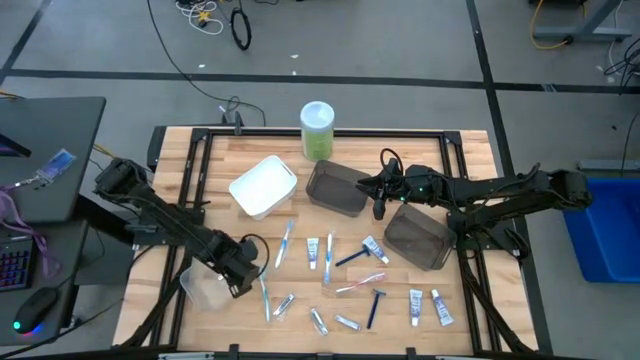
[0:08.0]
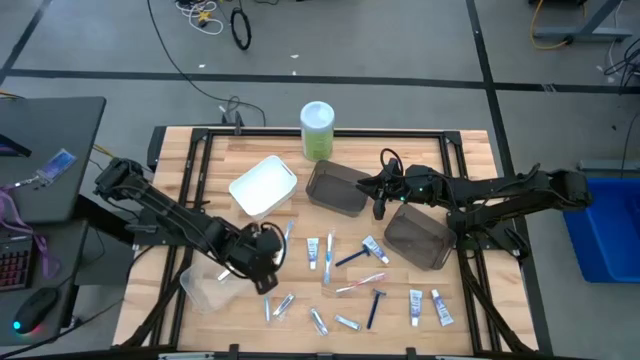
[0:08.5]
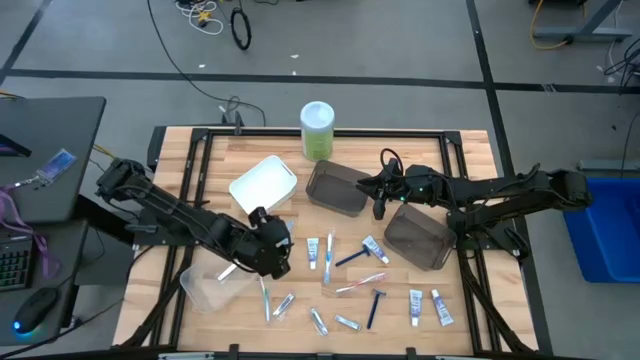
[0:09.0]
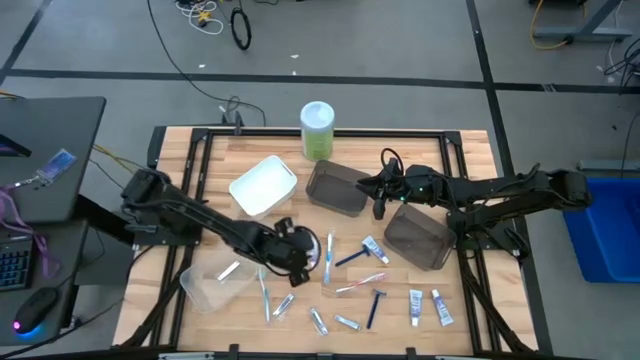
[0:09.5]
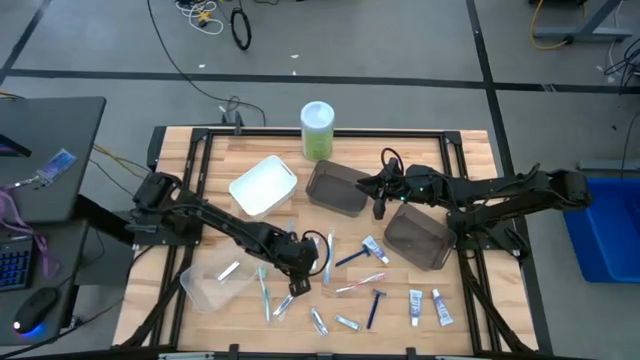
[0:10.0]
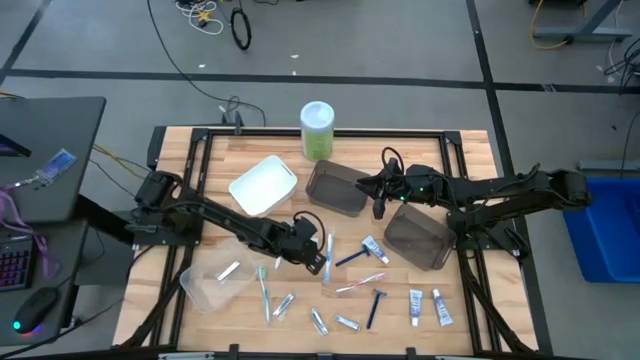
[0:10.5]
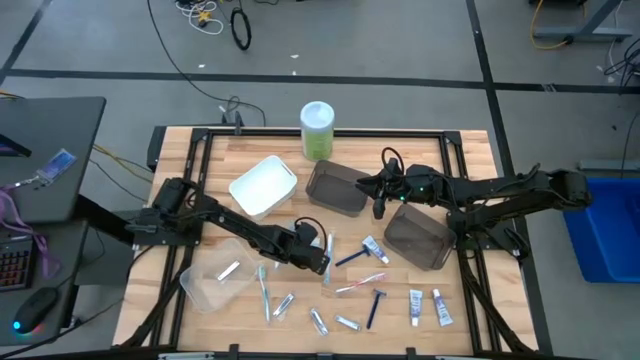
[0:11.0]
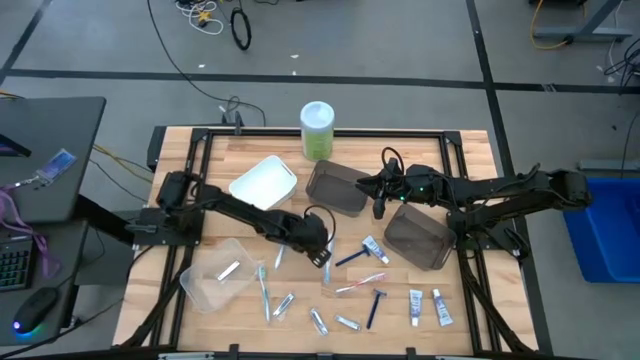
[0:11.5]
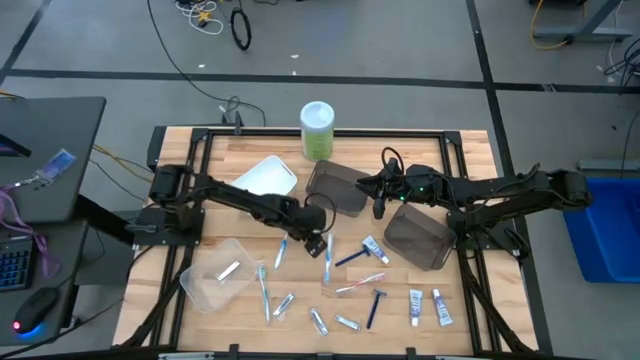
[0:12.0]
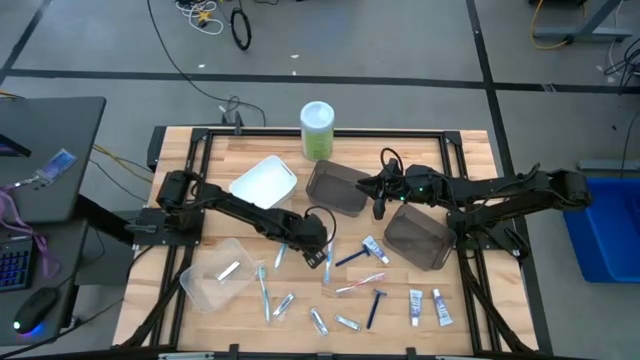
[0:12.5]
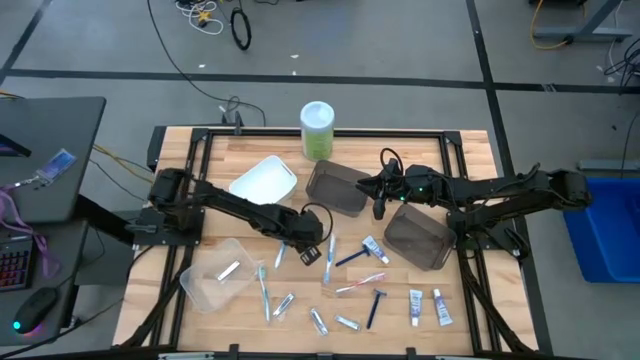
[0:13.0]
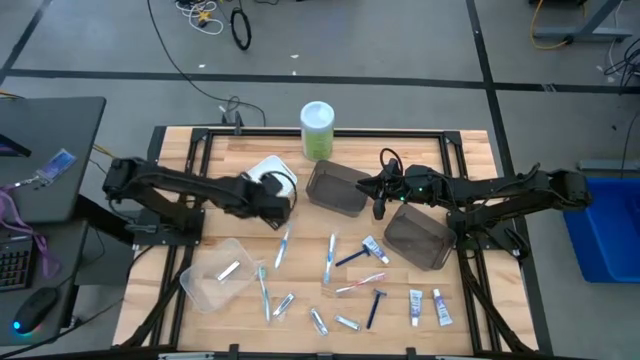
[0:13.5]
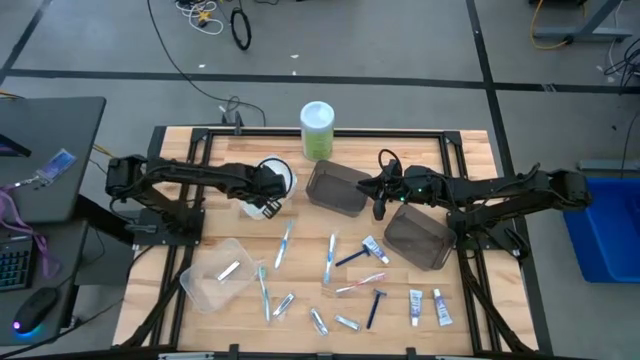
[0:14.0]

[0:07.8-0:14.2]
Task: Pick & Place Travel size toiletries
Put the toothpaste into the white bin

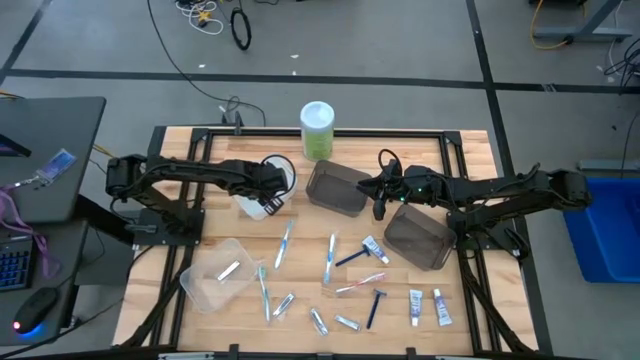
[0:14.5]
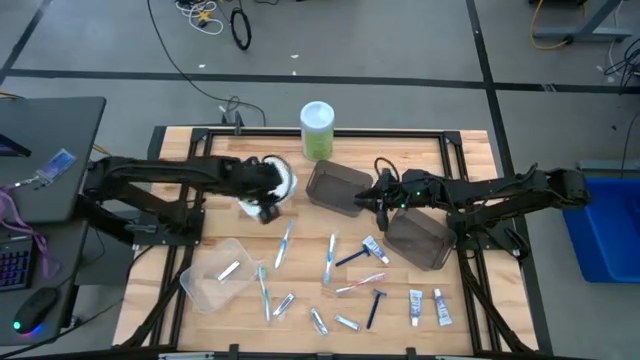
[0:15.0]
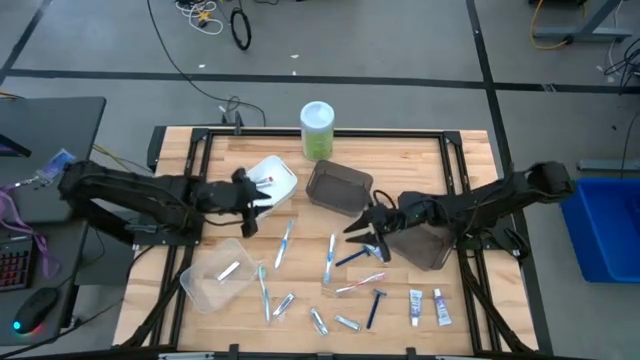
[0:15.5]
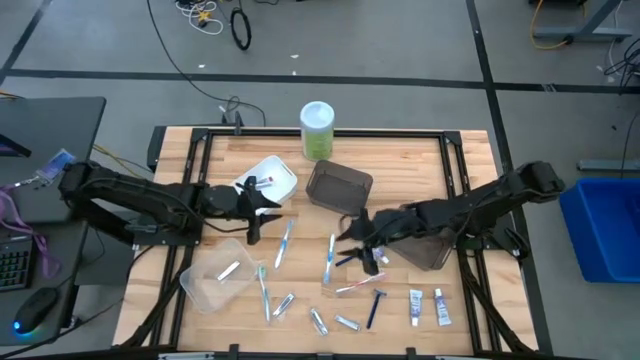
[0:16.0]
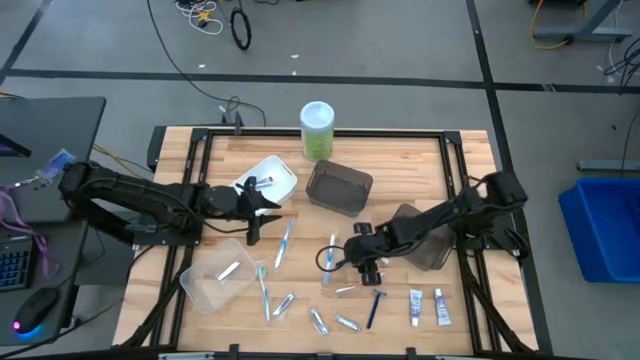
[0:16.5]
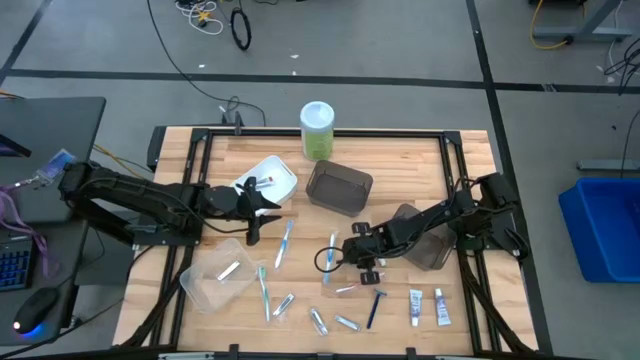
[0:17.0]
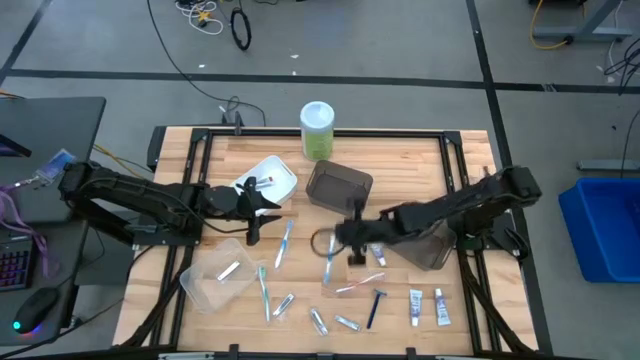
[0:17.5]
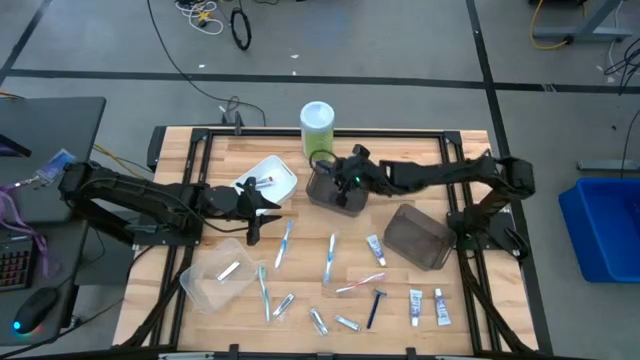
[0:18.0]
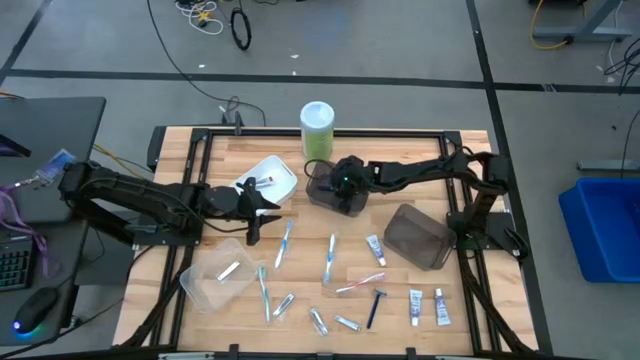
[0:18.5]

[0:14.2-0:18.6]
Put the blue razor into the left black bin

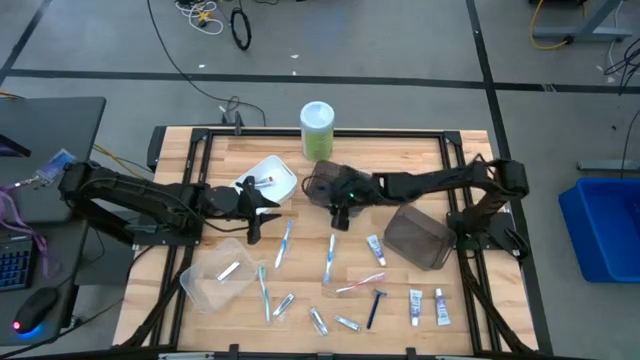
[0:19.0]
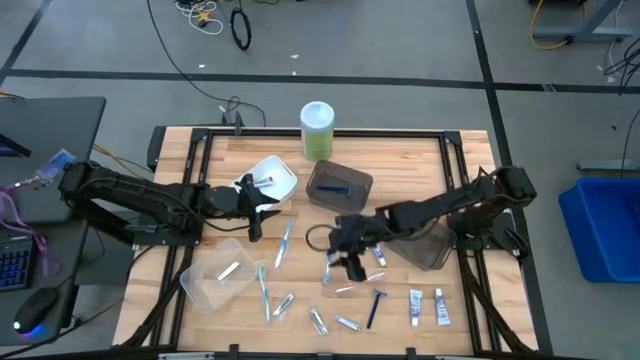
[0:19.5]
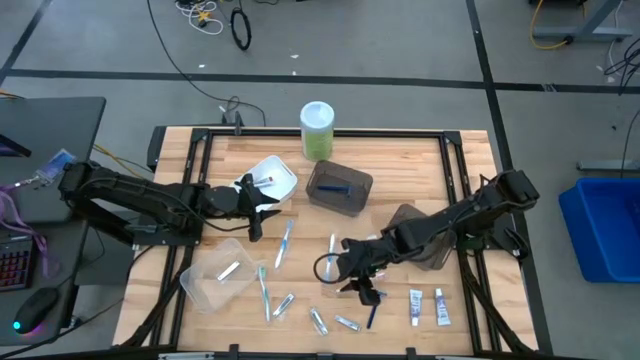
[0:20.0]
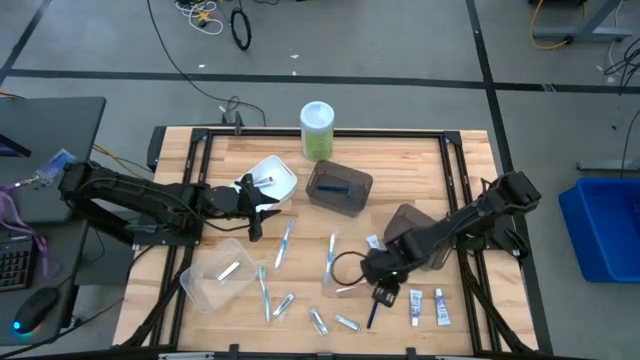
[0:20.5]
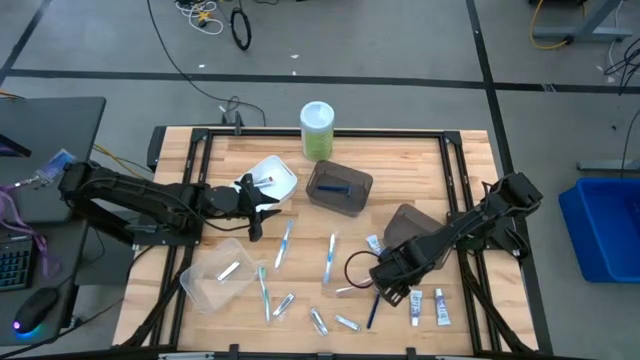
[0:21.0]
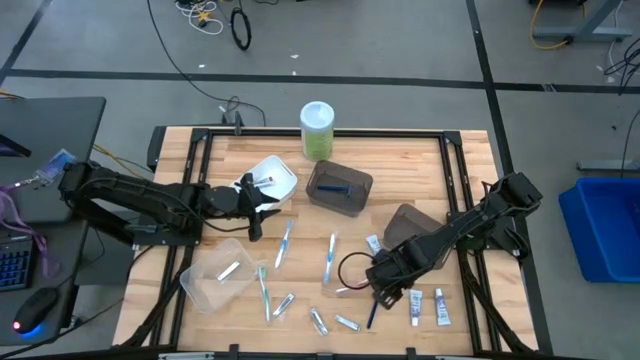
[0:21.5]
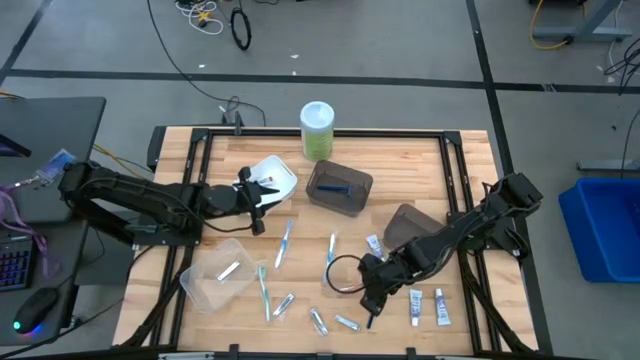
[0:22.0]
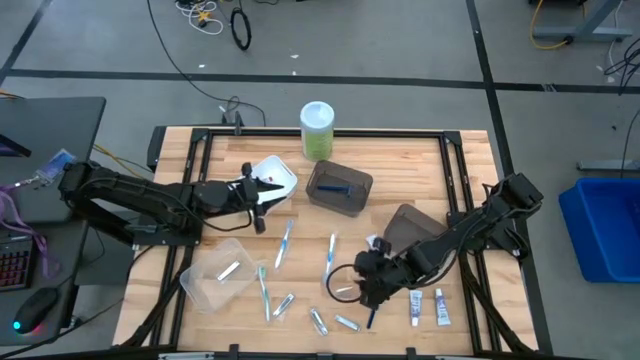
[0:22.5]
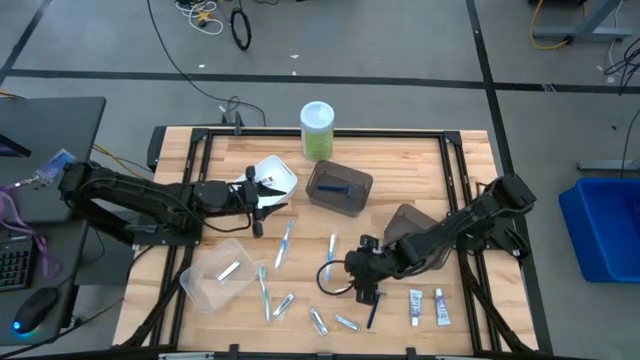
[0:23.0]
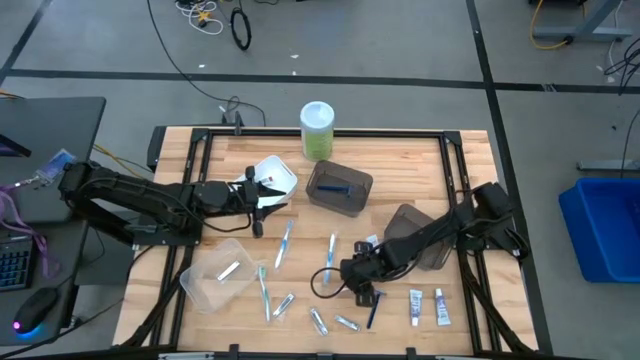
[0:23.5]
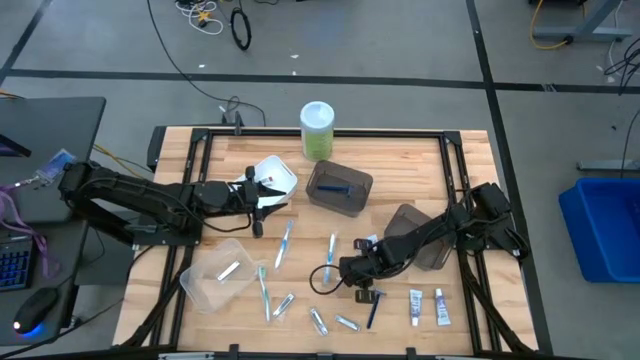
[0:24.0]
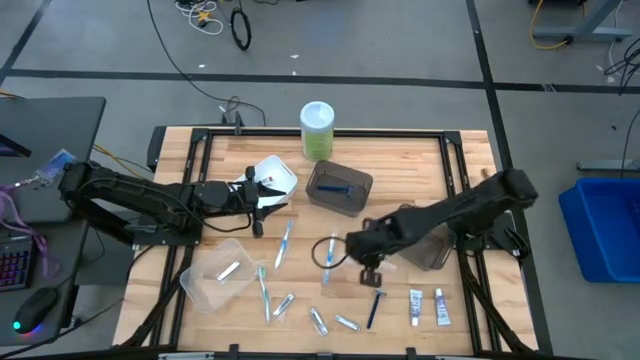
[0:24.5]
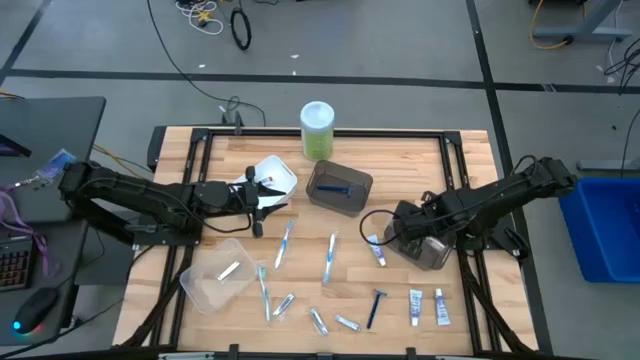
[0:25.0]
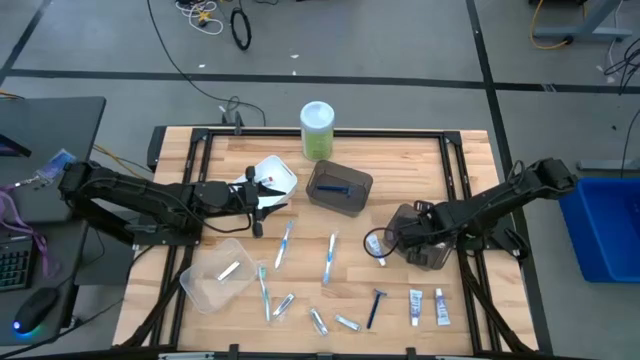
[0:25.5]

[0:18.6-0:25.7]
Put the red toothbrush into the right black bin

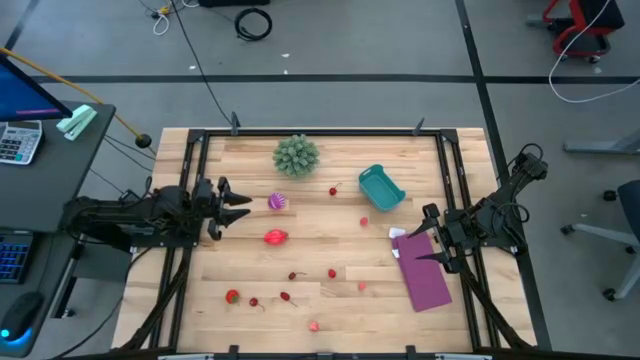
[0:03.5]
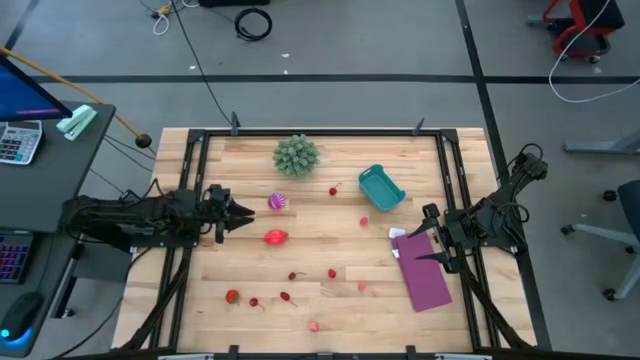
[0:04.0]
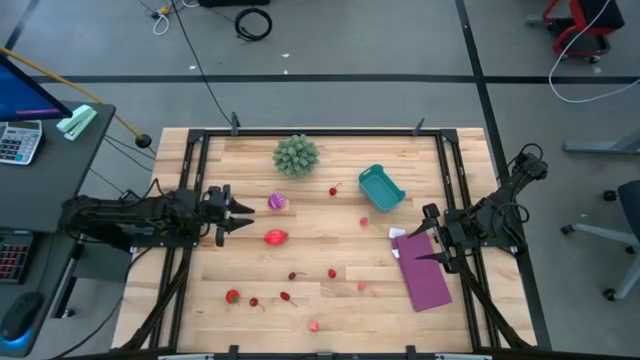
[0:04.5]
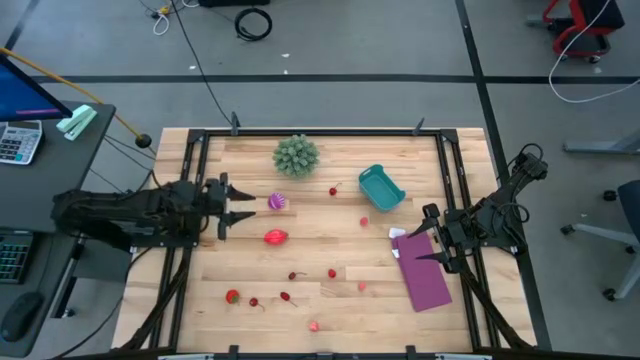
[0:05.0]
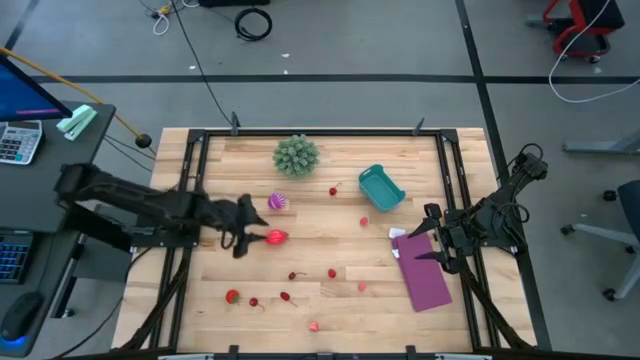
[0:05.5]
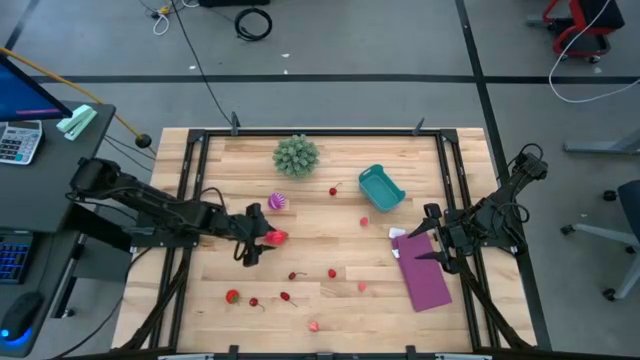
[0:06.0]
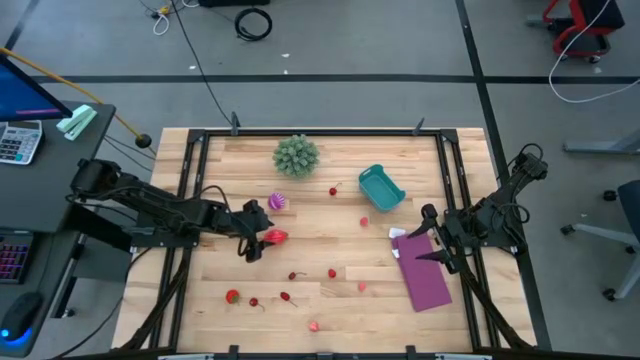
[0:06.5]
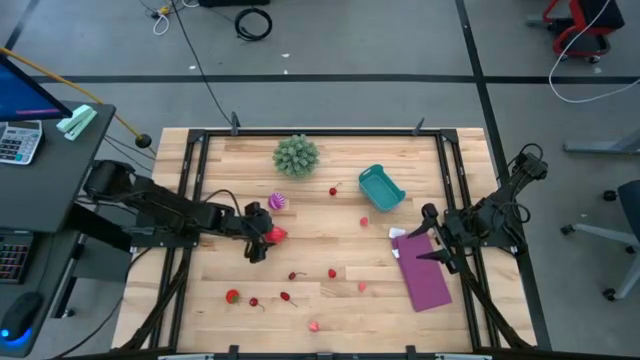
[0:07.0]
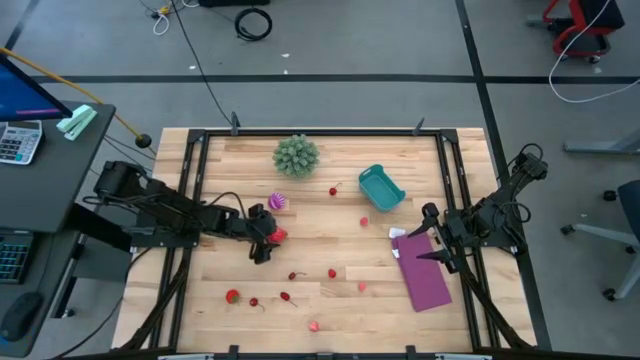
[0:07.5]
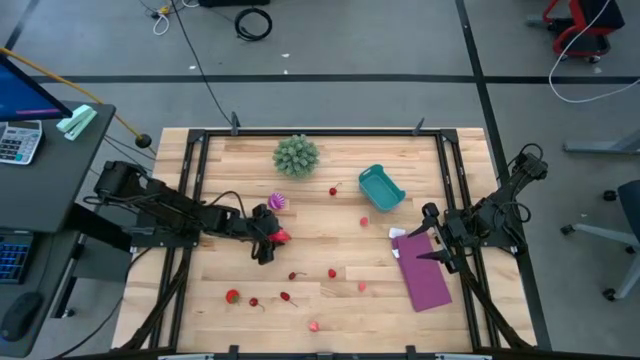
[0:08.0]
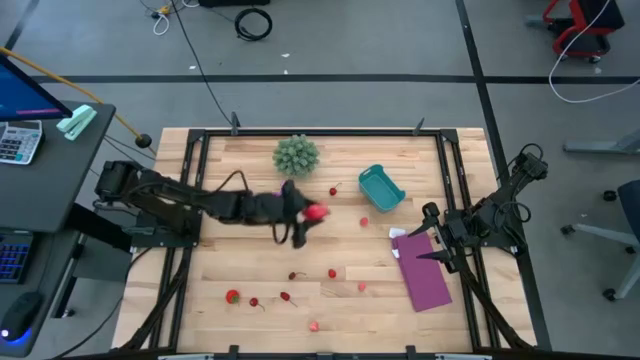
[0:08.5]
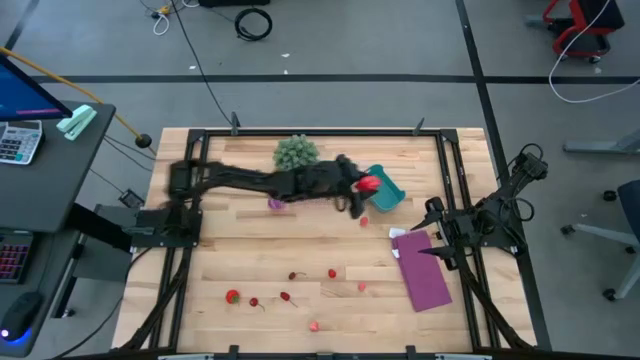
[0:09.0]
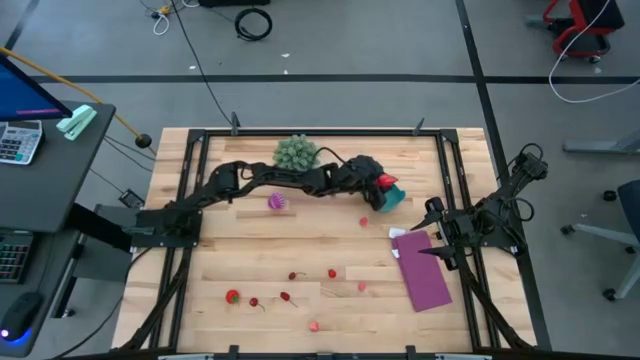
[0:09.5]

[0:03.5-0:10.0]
Task: Pick and placing Produce into tupperware
Put the red dragonfruit into the blue bin
